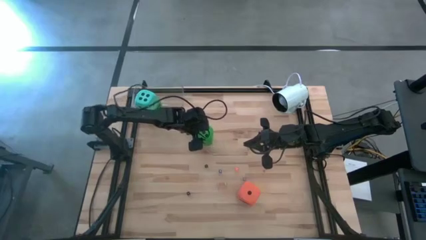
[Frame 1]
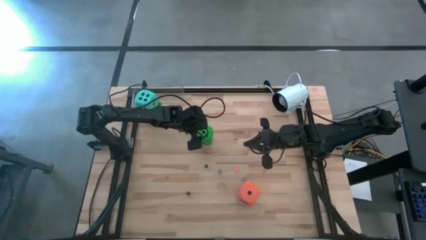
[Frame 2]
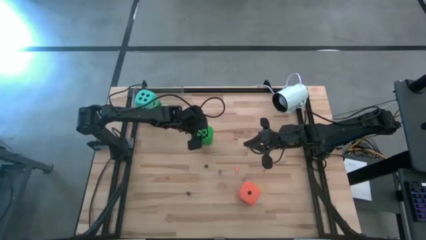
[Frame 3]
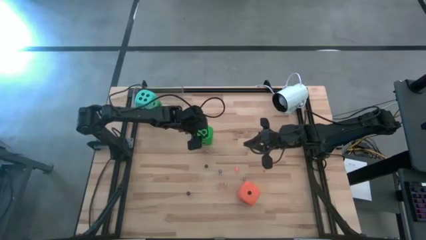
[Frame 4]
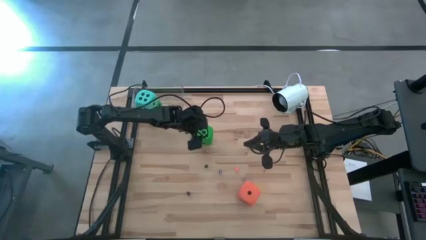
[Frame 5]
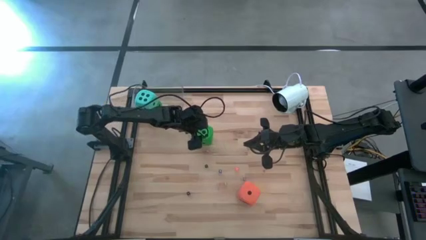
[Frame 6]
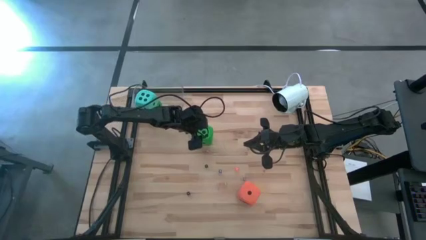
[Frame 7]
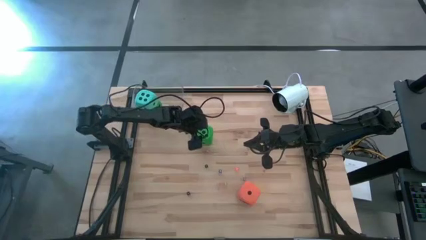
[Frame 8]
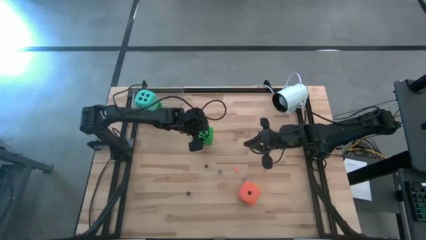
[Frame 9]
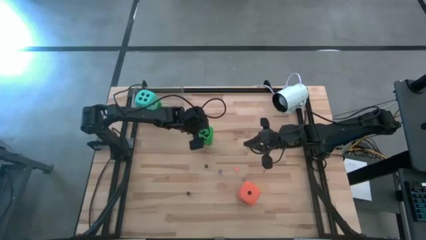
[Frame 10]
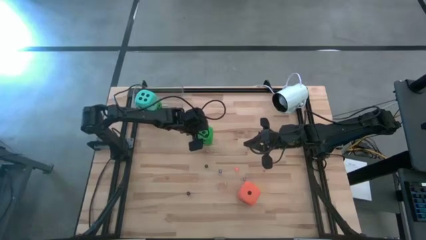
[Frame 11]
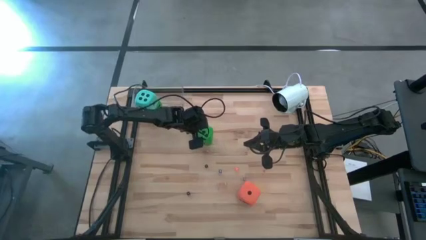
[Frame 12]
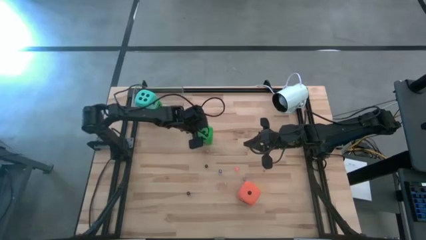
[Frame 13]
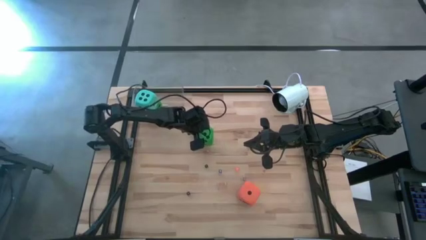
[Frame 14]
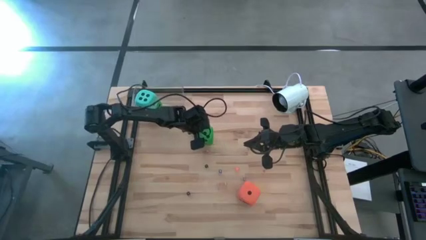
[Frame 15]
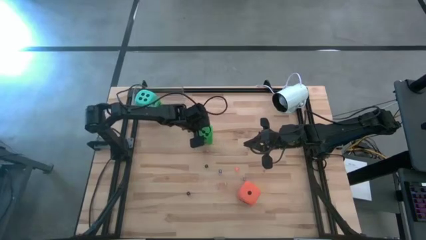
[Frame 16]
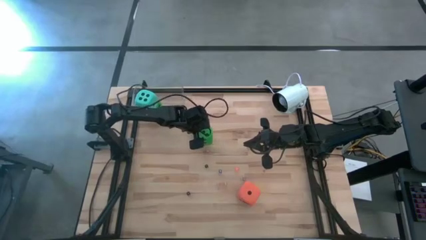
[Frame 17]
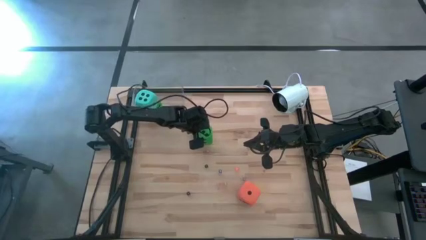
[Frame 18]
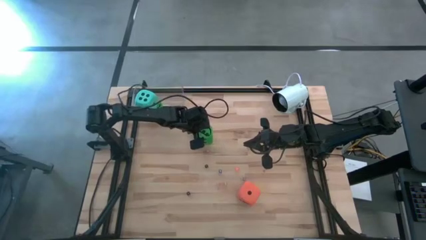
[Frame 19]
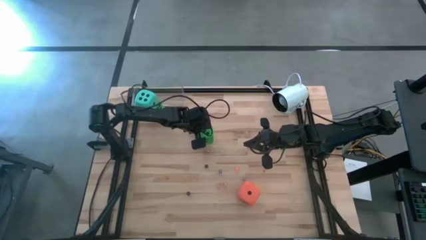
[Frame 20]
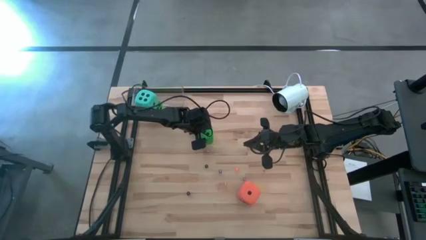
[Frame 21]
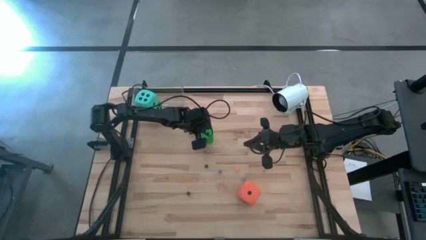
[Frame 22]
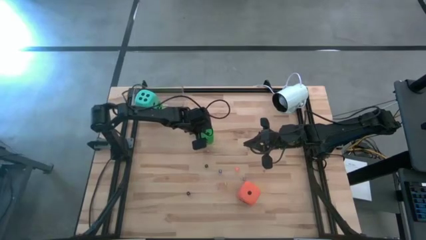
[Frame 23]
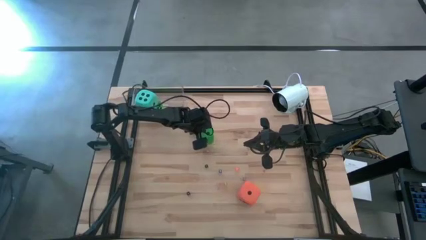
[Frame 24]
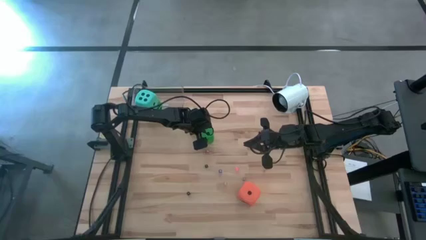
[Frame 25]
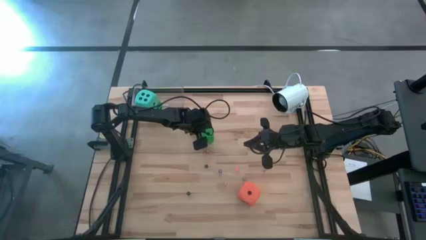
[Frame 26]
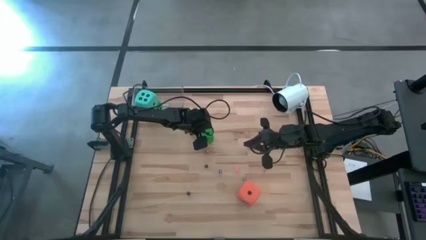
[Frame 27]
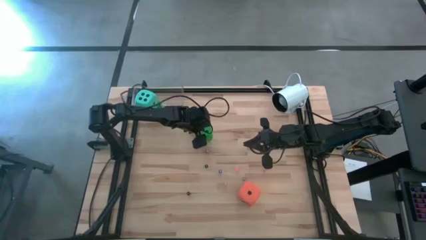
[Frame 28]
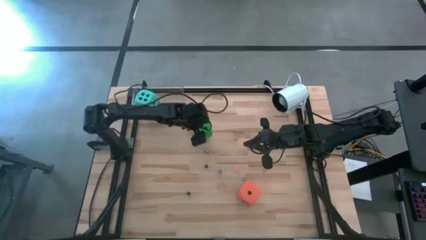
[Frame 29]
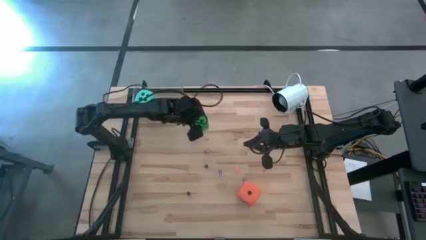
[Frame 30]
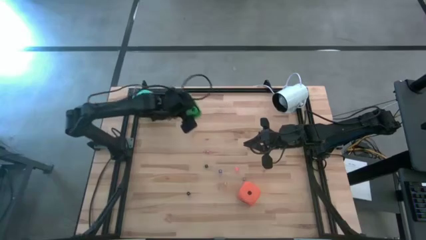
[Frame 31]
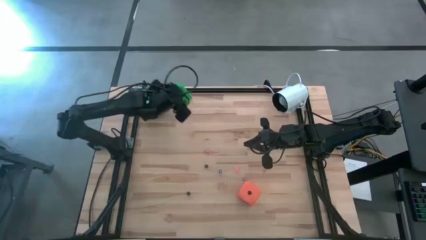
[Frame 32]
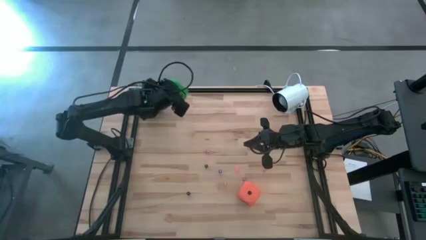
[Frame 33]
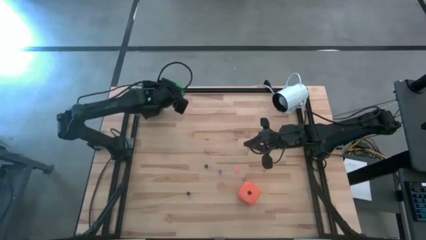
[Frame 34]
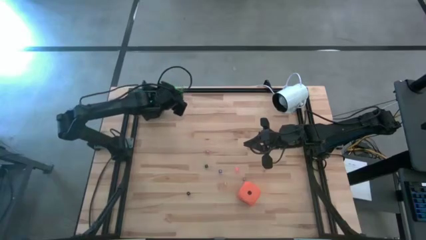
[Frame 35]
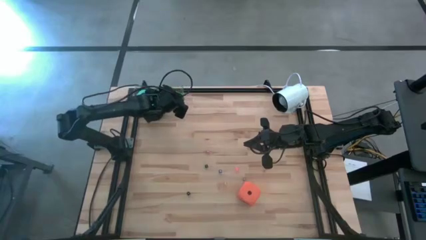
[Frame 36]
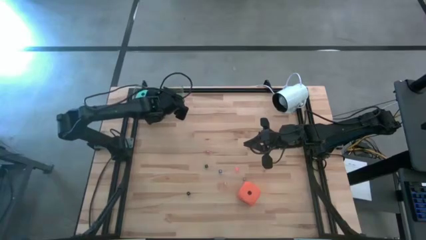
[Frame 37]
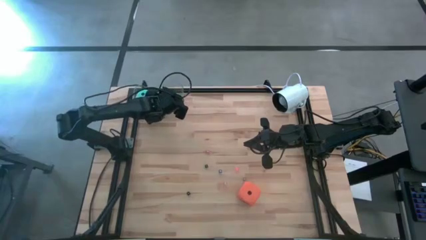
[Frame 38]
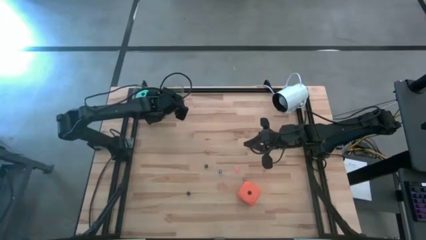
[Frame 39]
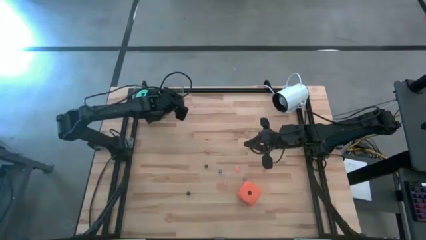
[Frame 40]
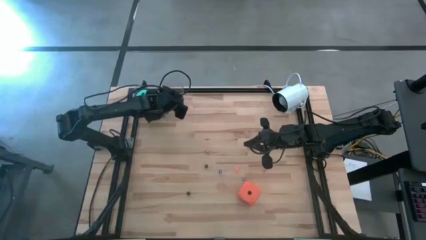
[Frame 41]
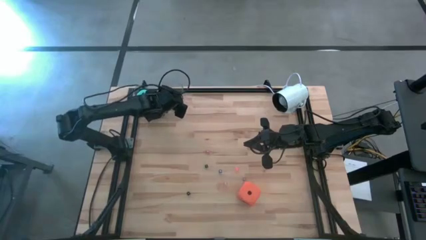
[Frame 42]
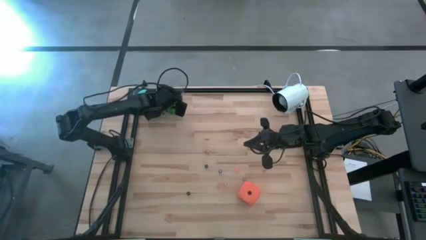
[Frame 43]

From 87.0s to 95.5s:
Task: Pick & Place Dice
Put the large green die into the transparent bin

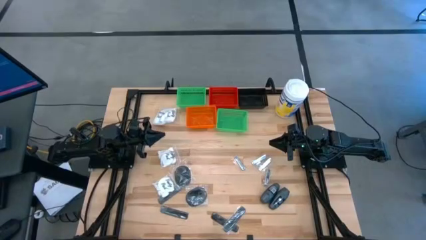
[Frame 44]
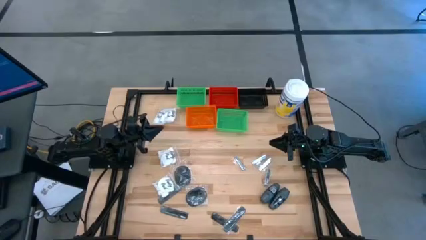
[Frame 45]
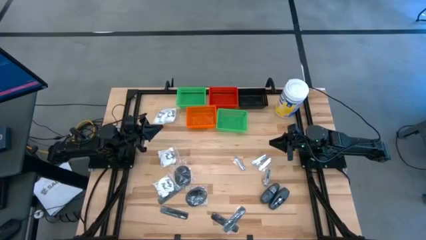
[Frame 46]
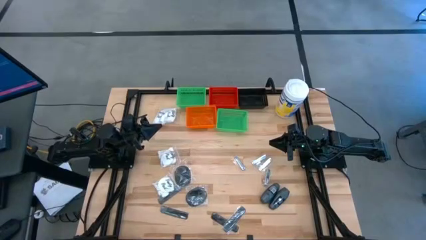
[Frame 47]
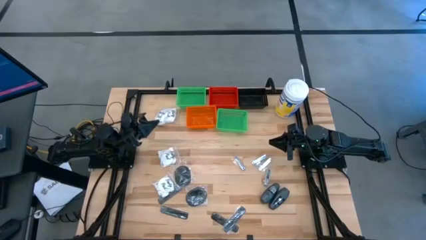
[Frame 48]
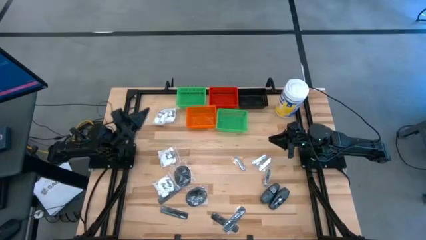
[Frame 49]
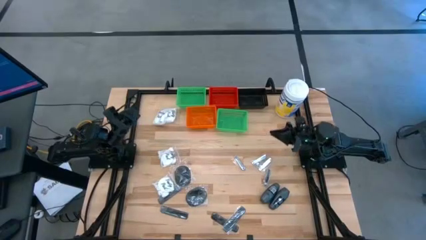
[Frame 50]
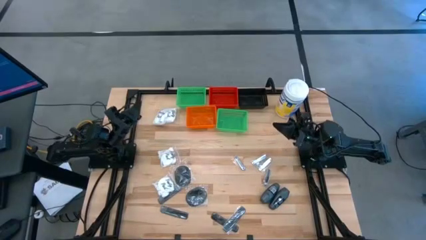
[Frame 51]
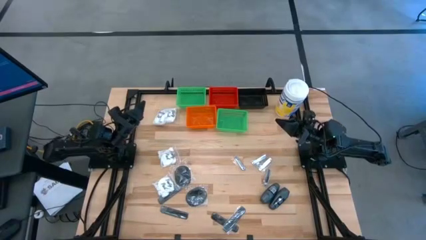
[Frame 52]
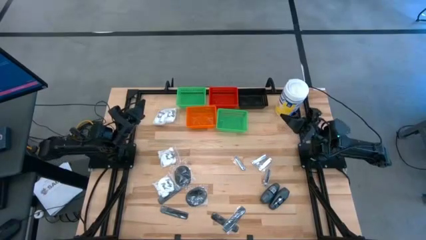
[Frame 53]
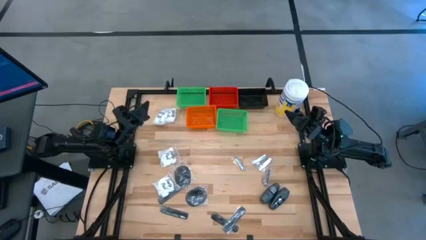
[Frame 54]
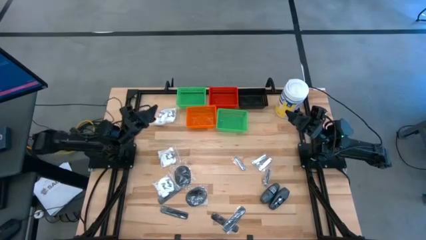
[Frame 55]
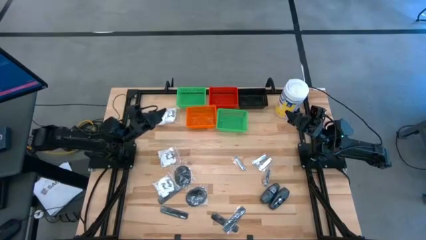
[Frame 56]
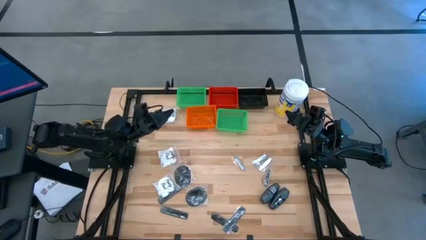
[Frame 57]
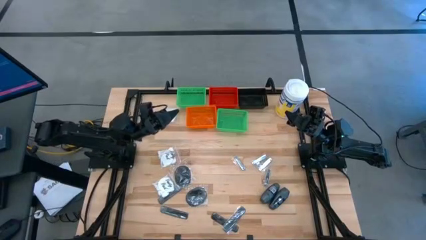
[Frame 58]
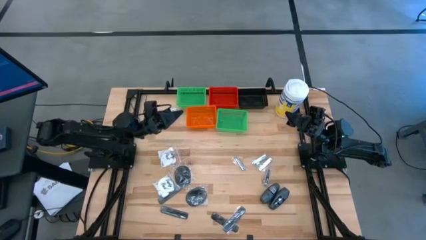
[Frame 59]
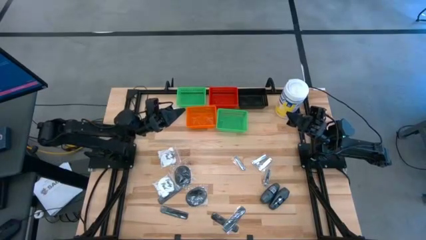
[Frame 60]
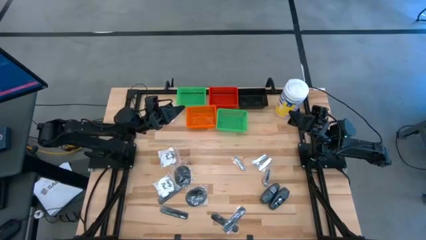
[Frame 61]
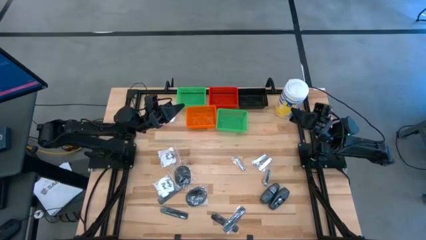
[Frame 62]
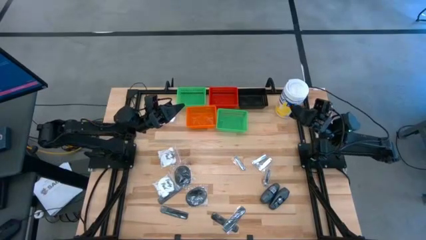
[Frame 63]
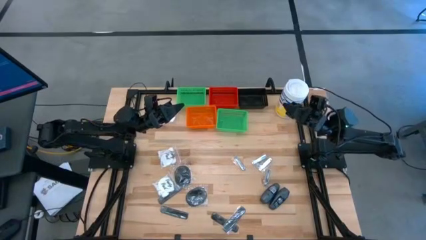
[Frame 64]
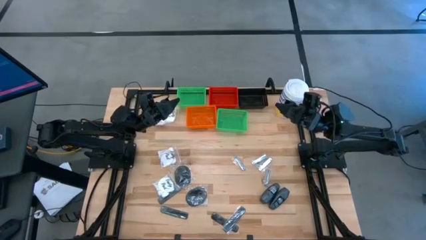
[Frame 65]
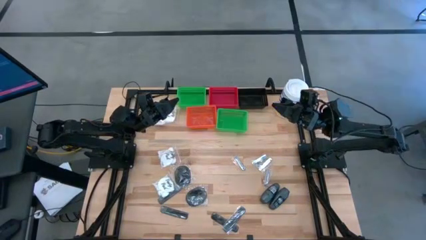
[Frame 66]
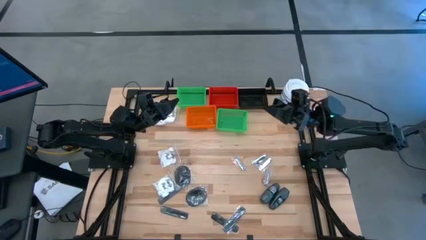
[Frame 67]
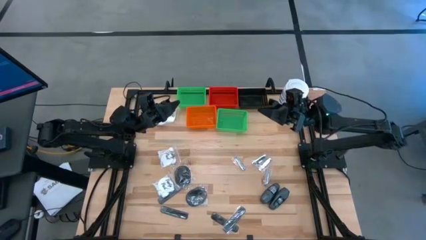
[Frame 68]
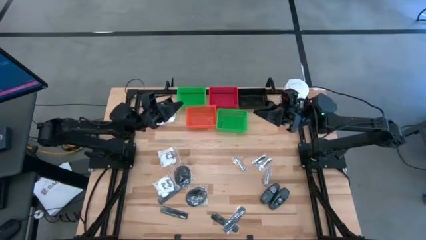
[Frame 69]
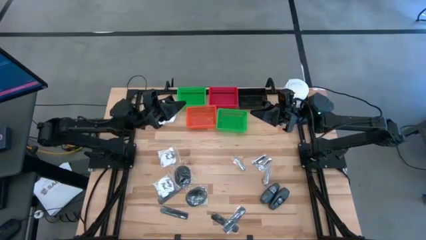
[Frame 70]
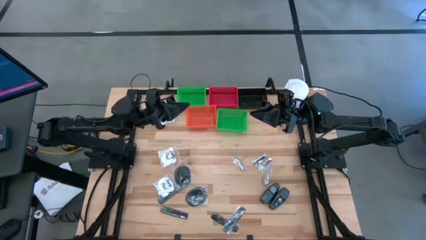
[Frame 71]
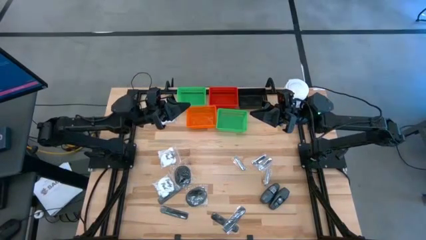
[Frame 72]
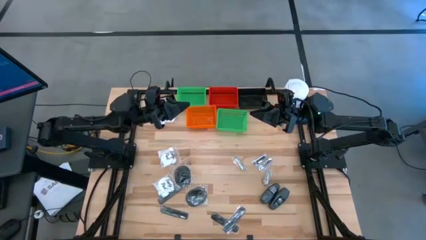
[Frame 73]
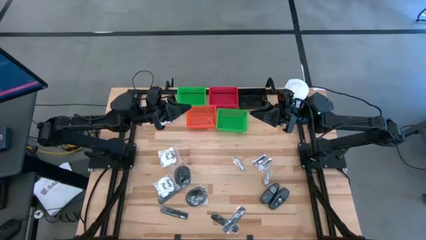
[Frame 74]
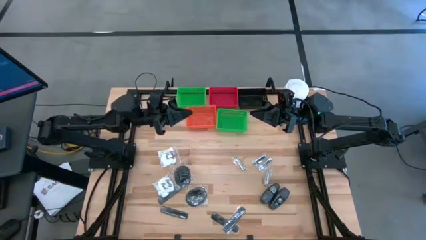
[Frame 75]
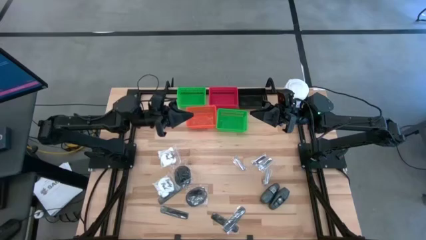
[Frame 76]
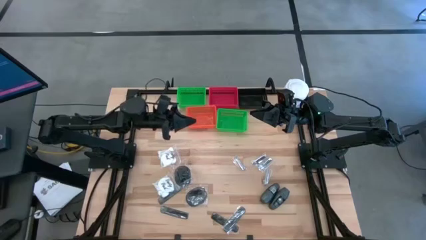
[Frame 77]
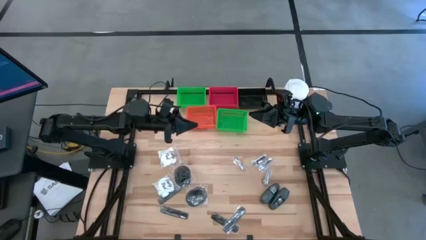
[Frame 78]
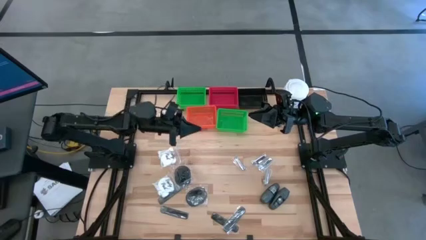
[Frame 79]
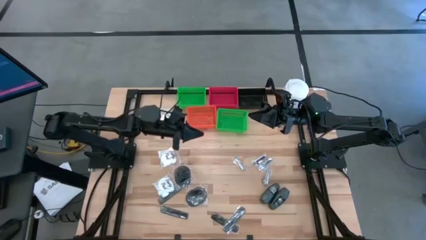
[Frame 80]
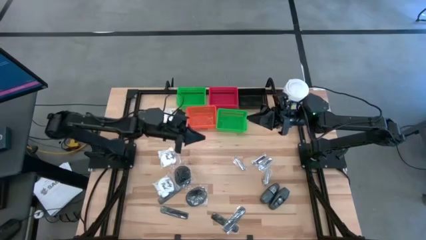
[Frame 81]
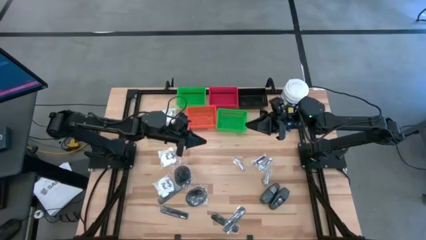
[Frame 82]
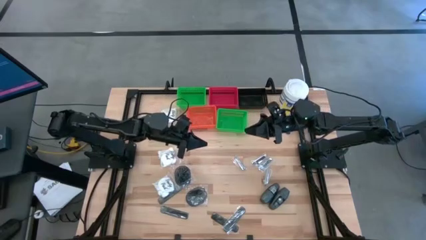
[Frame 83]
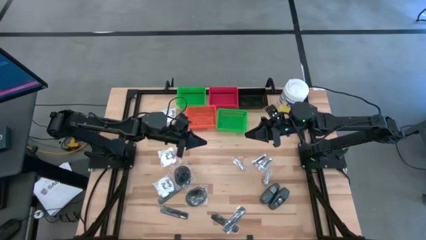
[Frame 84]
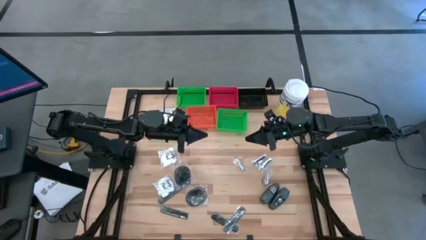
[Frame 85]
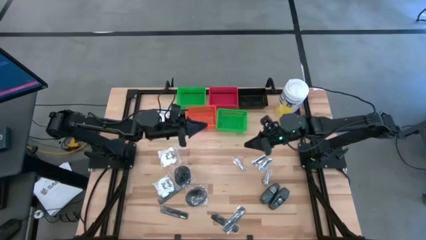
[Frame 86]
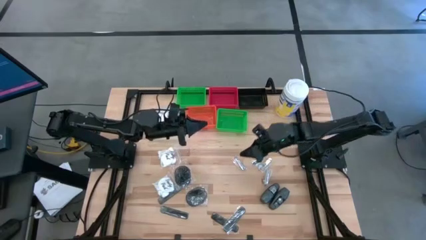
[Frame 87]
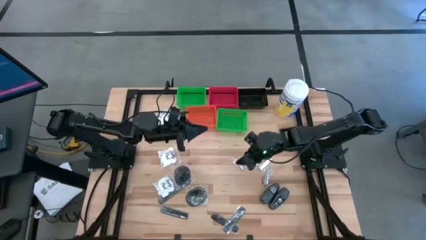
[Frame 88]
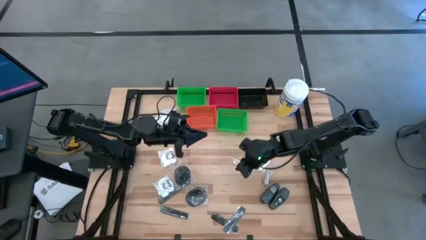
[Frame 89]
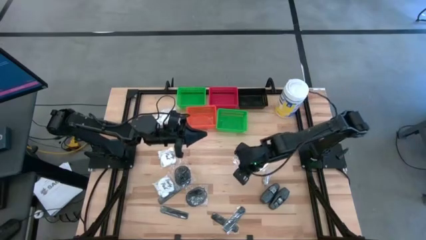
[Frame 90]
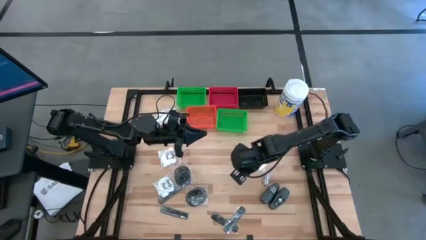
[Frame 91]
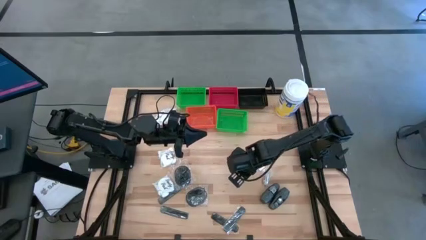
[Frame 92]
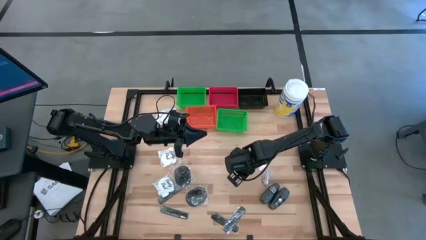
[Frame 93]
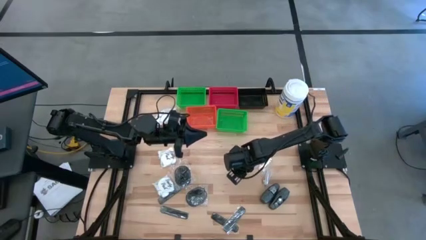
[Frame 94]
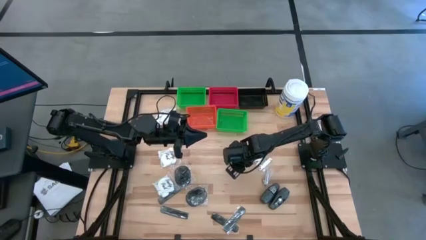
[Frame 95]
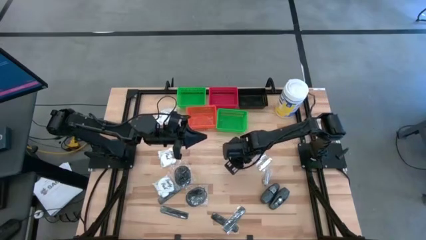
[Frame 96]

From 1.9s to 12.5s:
Task: Pick & Place Travel size toiletries
Put the nail cutter into the black bin
